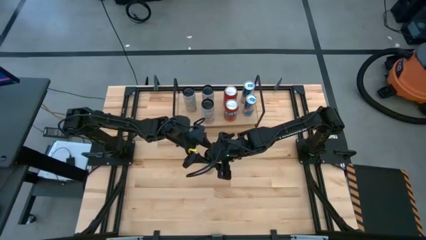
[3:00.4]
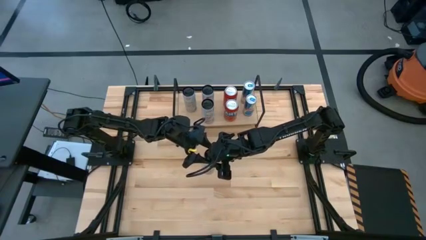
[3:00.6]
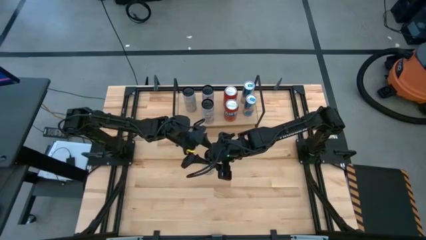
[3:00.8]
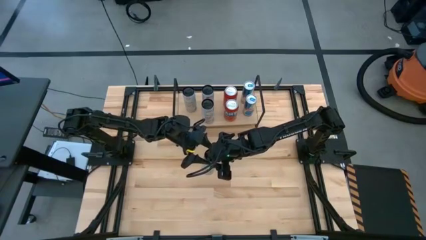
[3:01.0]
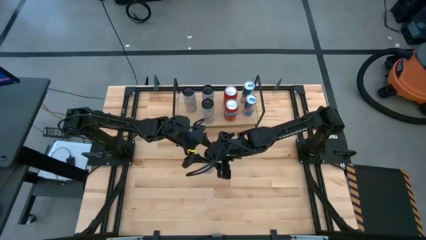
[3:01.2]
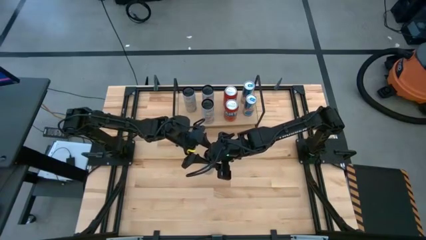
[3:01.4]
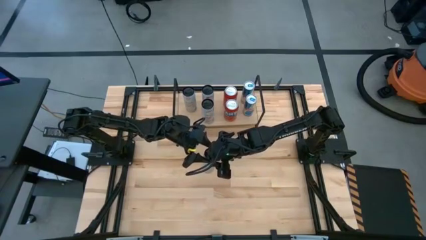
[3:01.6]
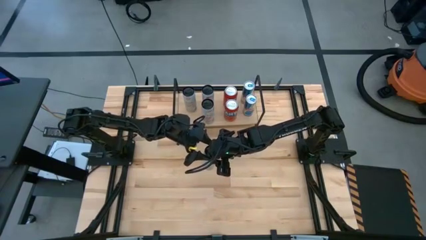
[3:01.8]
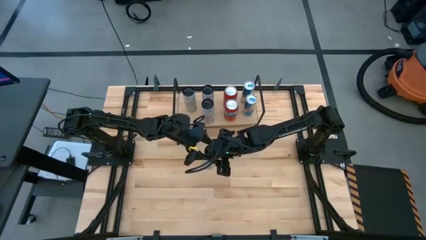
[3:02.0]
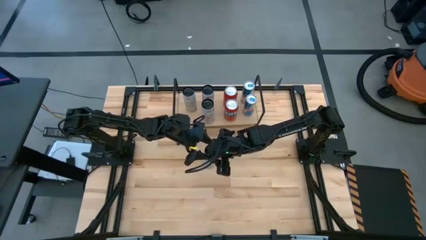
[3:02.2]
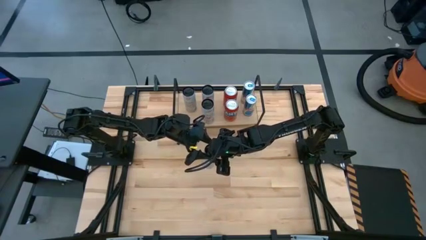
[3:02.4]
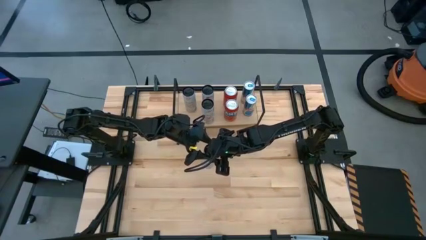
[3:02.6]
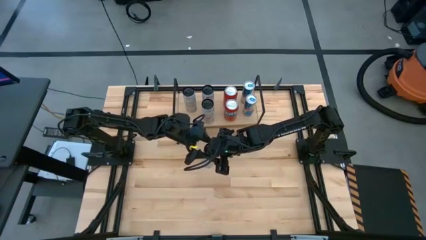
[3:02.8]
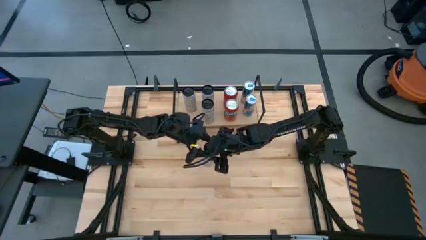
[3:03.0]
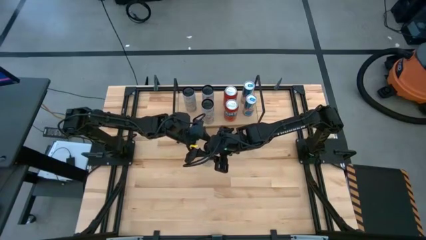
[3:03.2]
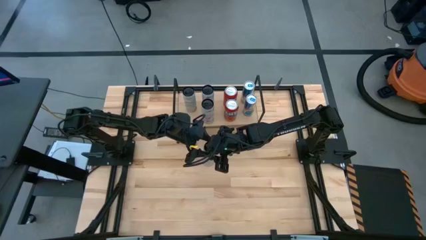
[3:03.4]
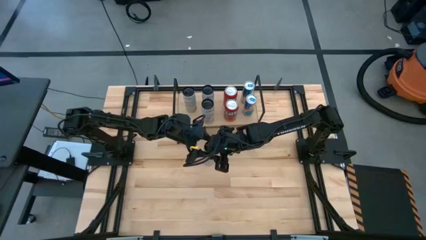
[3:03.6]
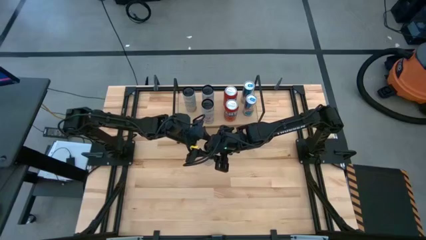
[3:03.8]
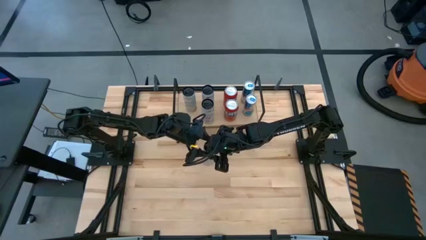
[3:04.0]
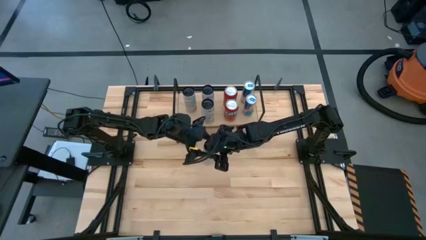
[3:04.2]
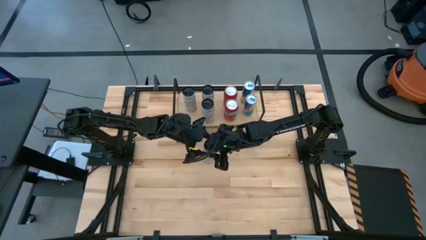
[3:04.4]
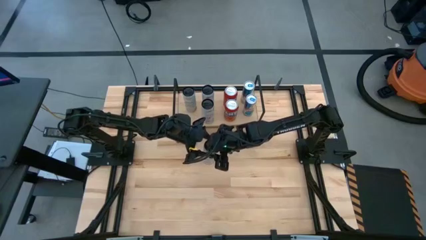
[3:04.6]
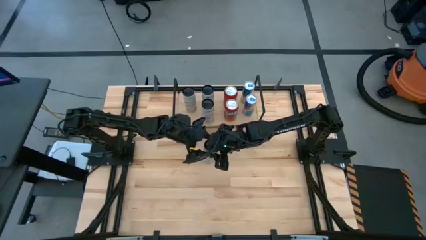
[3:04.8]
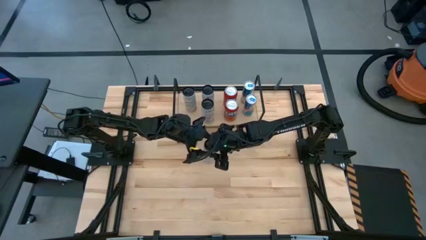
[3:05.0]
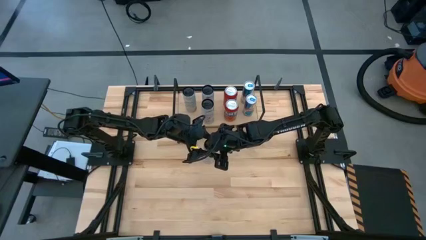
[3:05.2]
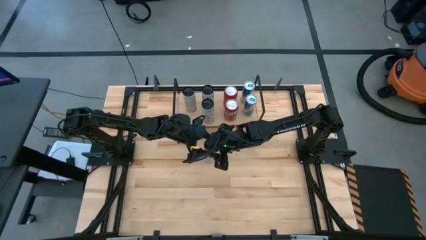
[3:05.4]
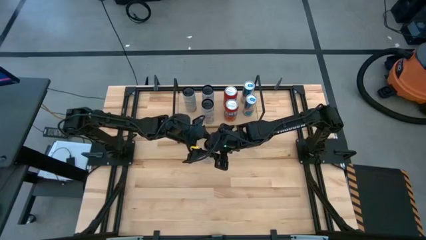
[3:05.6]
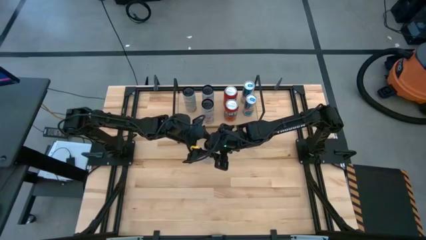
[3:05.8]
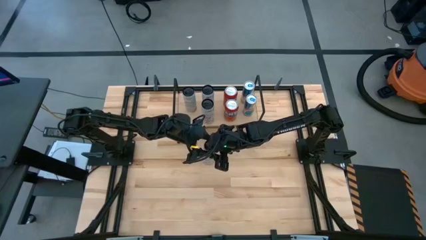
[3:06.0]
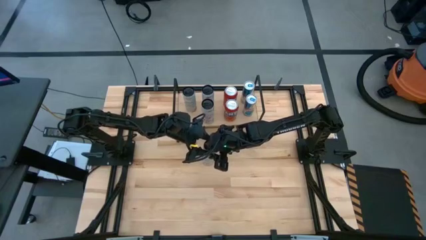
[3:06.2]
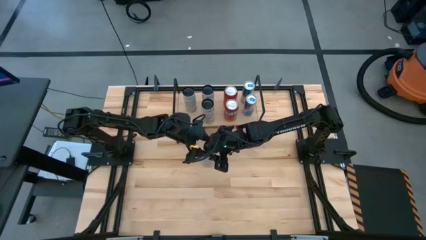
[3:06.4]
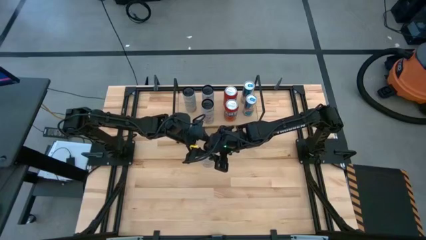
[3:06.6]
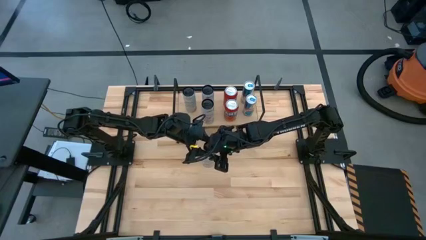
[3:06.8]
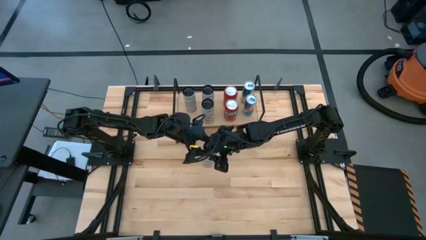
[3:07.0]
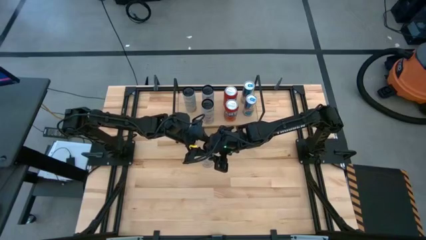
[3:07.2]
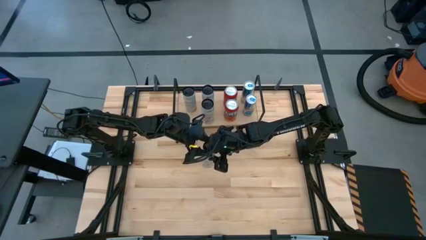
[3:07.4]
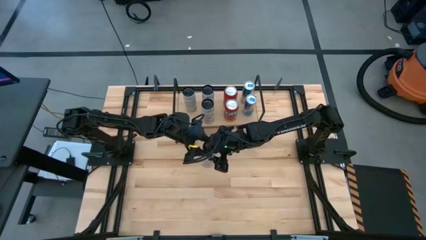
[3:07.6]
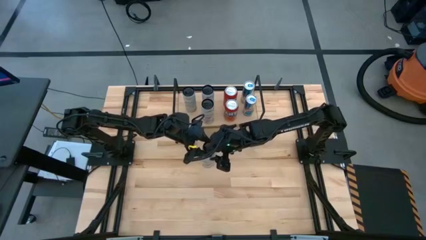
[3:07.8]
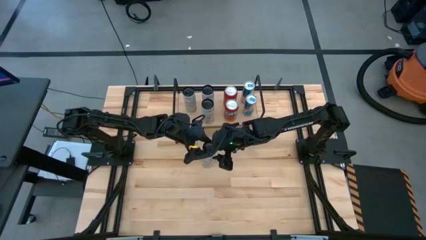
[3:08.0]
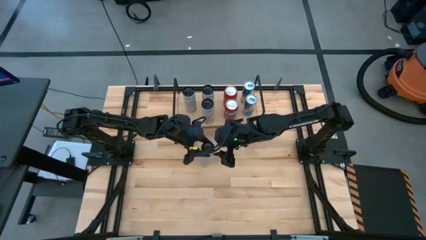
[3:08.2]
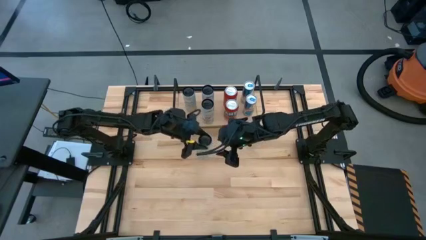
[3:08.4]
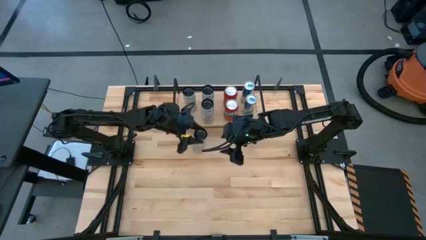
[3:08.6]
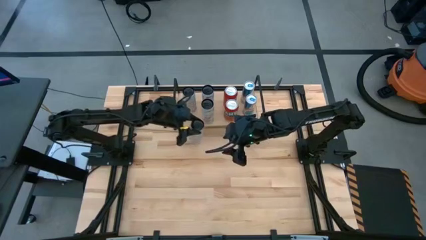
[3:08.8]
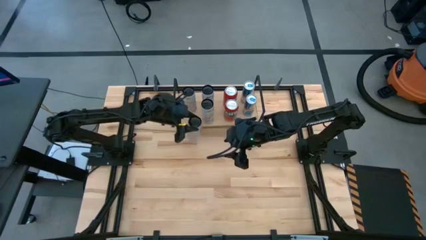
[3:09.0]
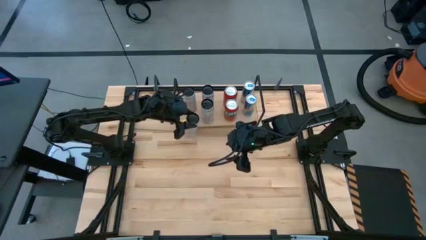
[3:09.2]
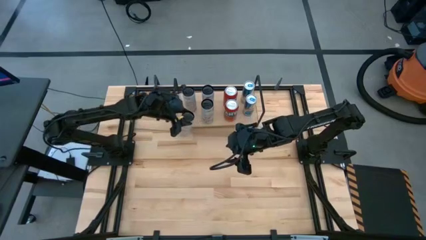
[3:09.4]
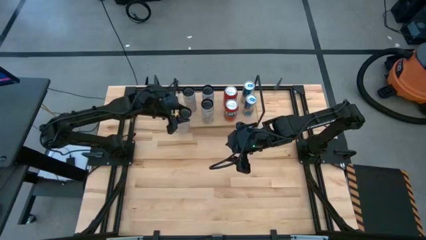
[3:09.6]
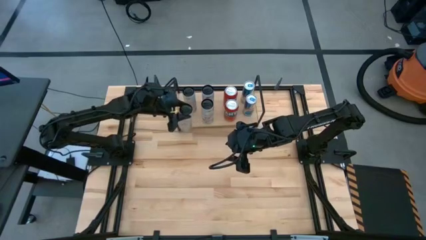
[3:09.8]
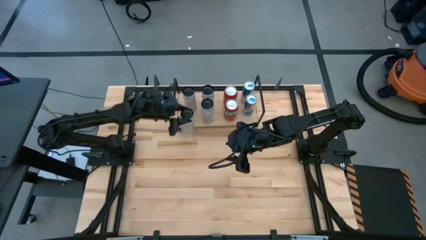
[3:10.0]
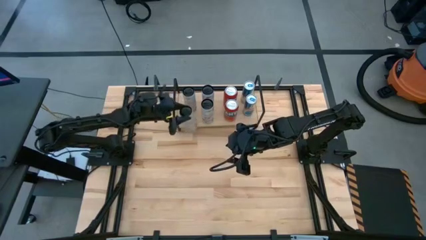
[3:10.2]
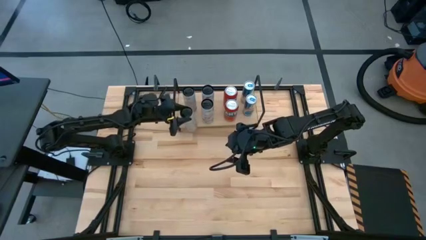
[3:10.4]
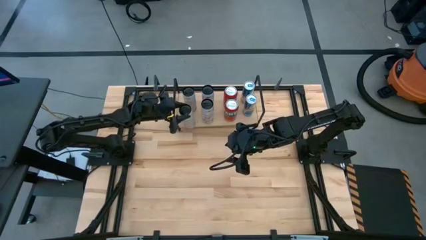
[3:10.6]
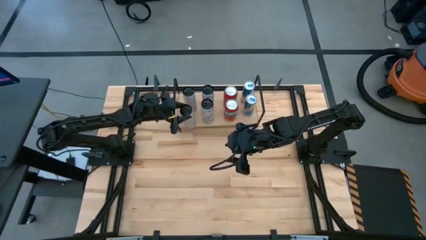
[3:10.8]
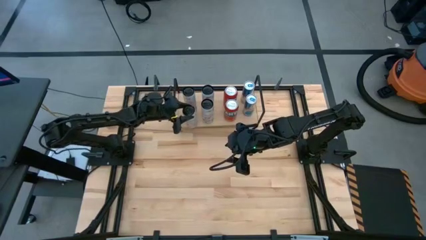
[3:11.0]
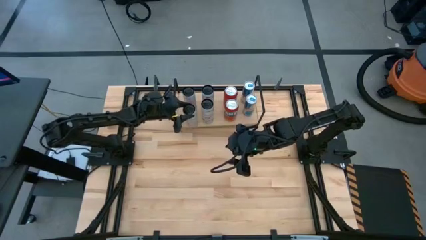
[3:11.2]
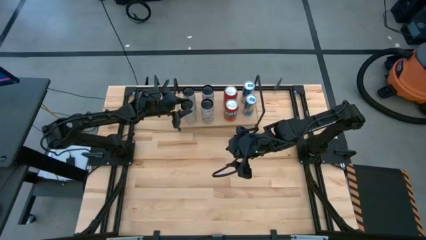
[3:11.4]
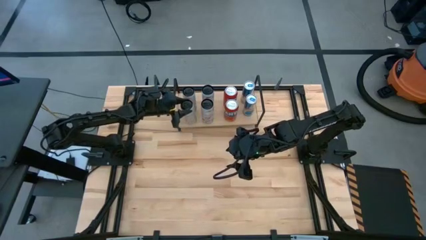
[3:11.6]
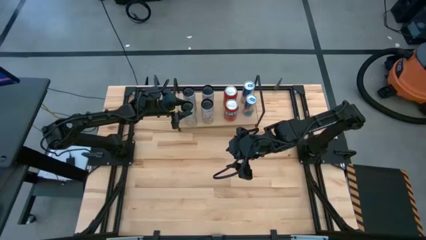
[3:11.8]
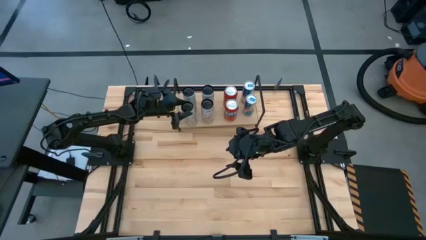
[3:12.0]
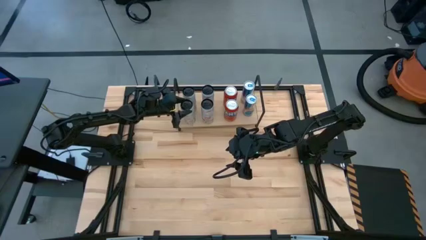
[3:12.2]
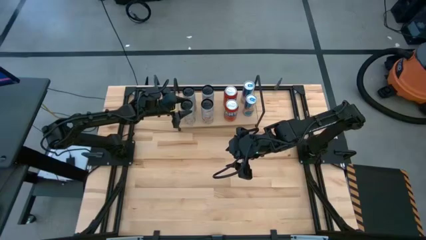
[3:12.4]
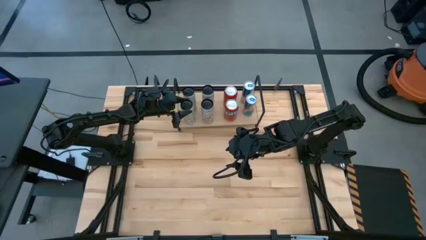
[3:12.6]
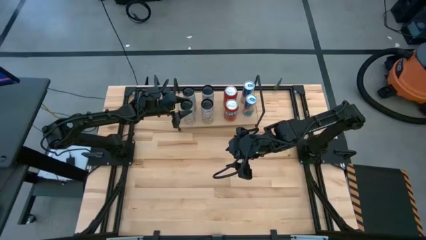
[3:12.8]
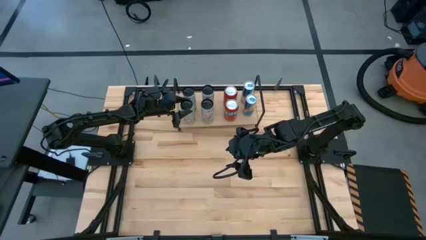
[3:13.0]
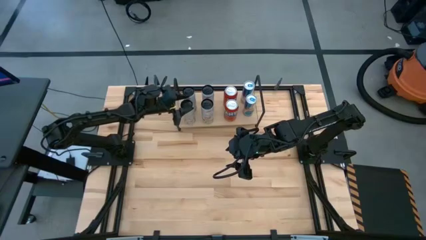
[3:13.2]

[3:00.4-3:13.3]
Task: Place canned beverage on shelf
Put the white and pink soda can aligned with the other white and pink soda can on the shelf
